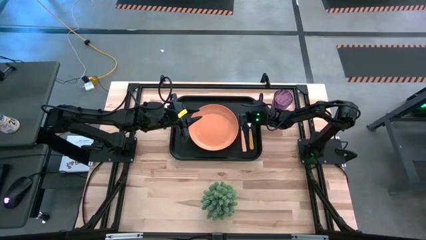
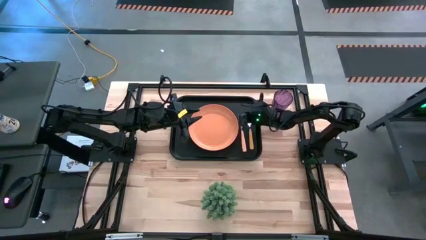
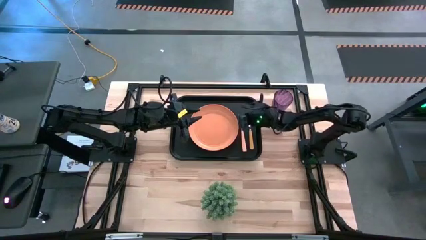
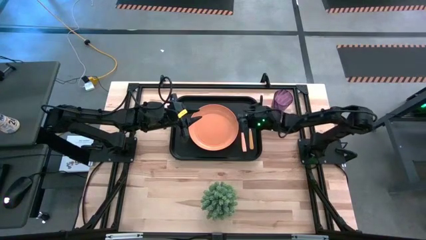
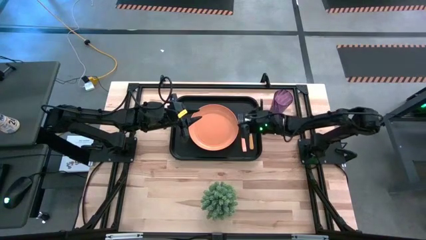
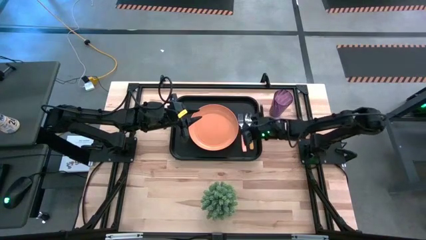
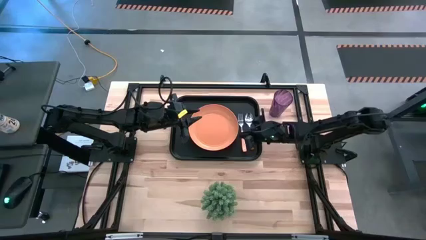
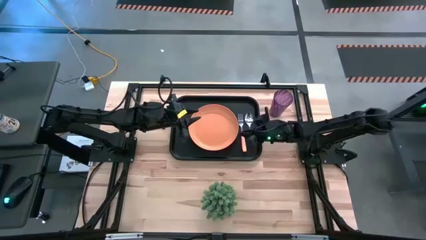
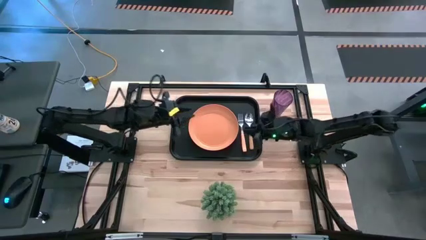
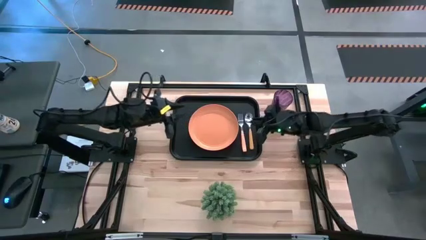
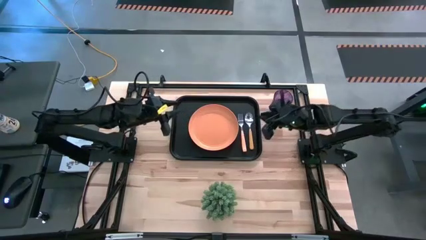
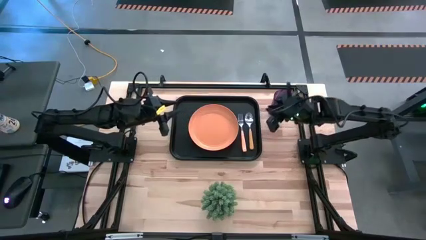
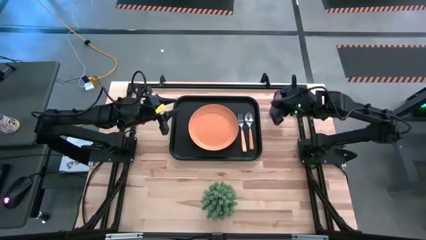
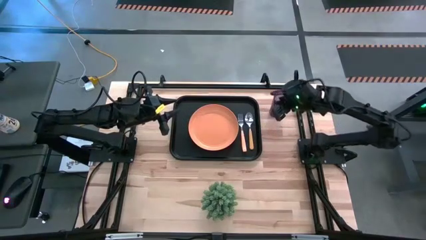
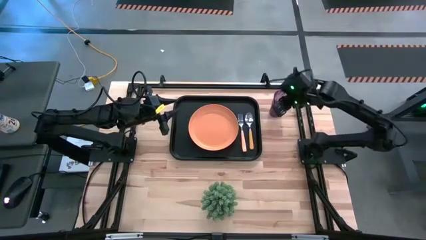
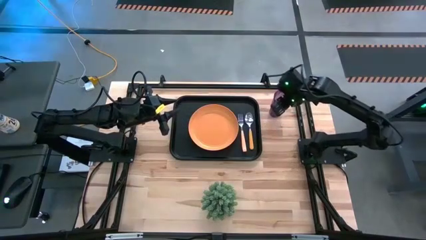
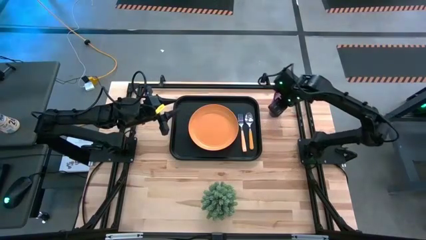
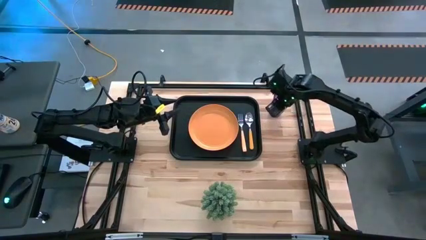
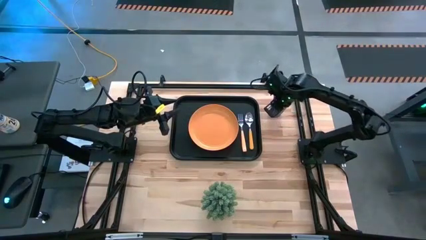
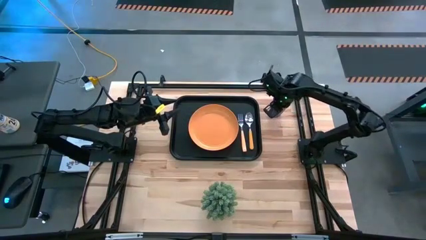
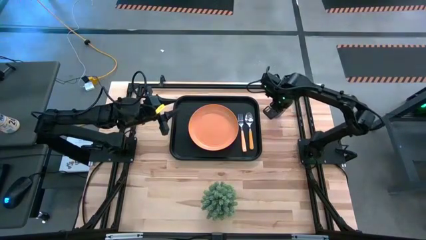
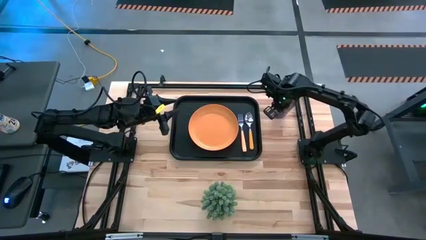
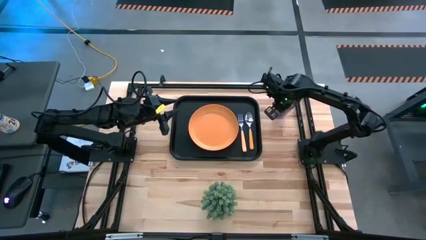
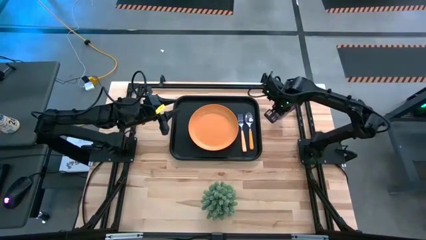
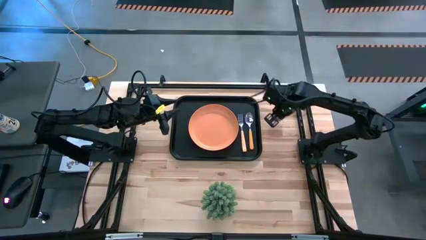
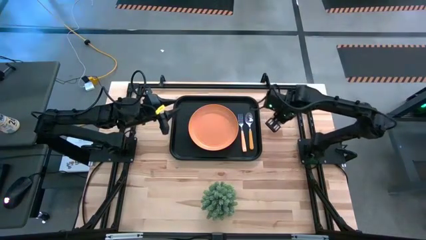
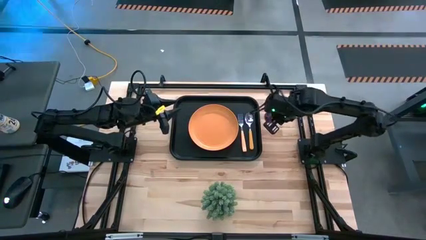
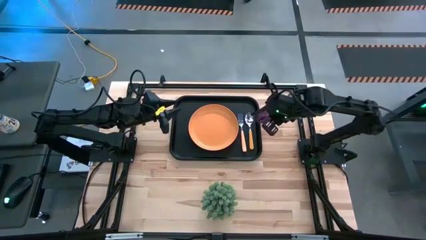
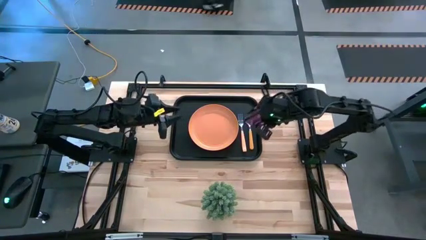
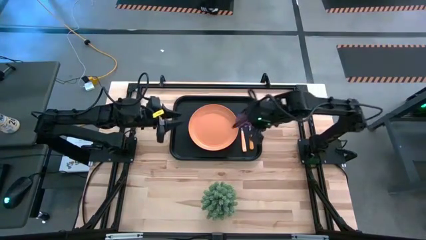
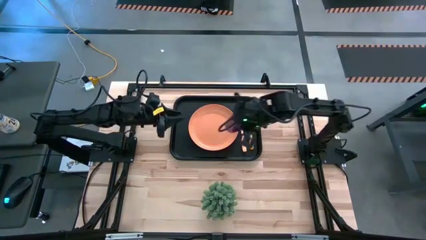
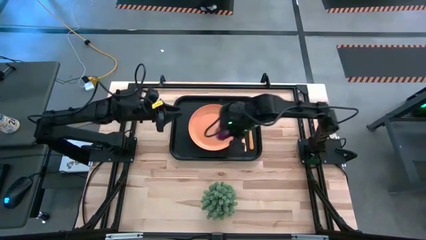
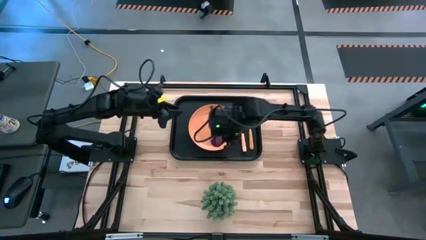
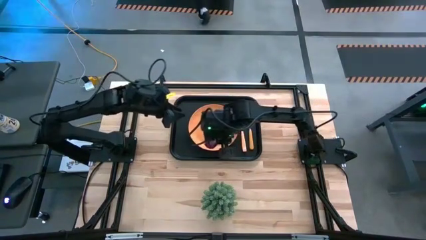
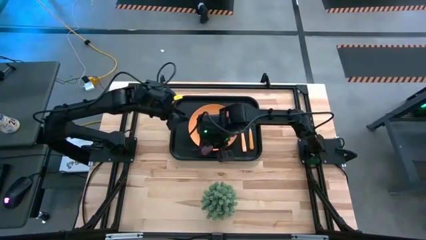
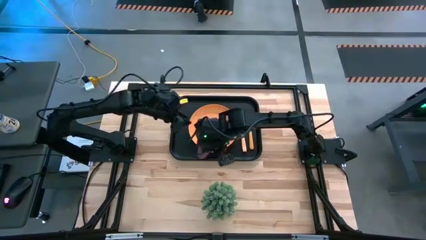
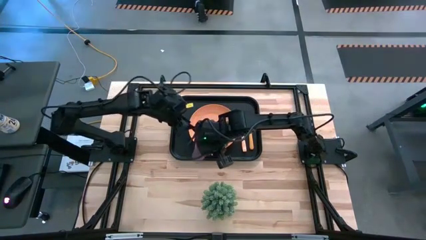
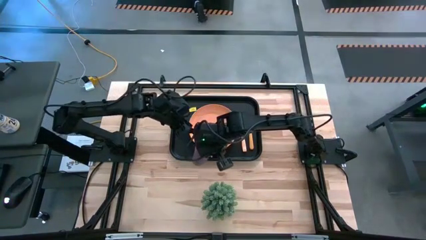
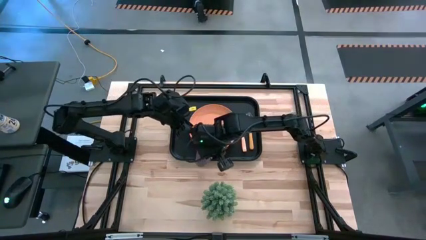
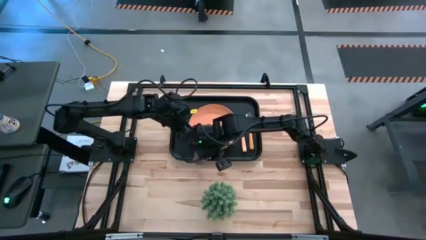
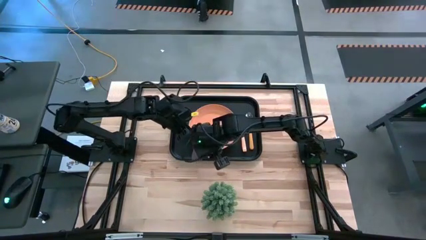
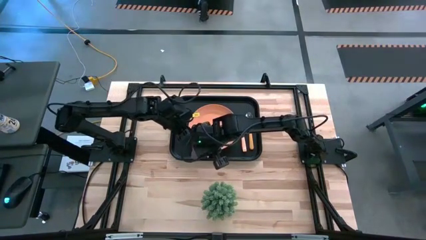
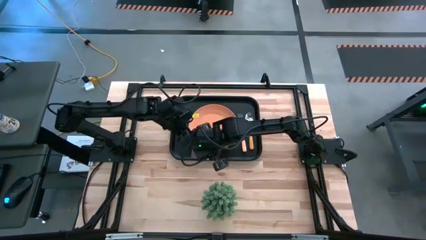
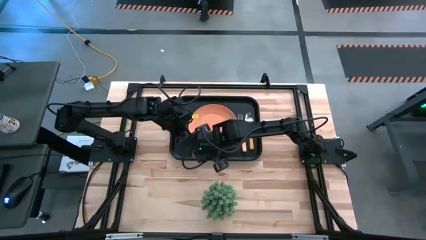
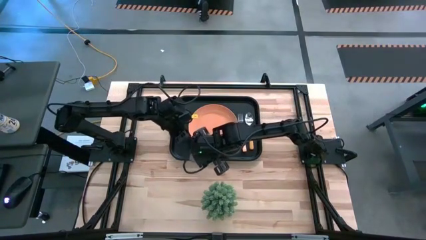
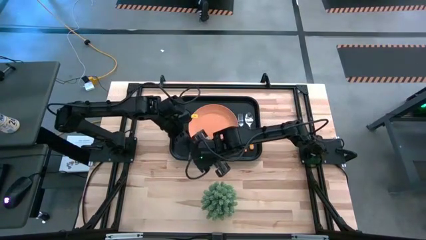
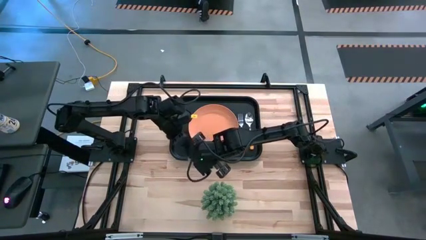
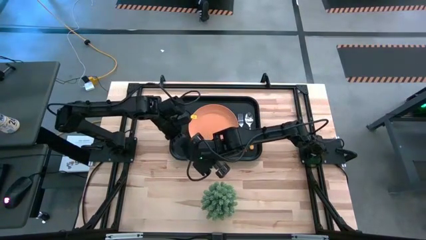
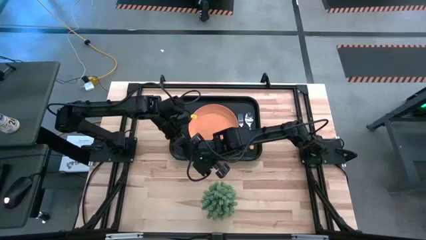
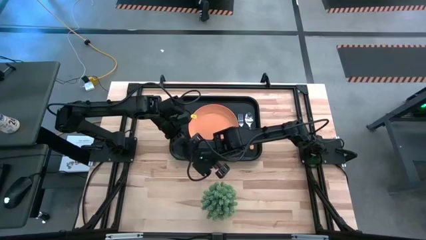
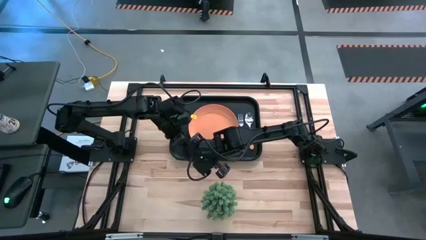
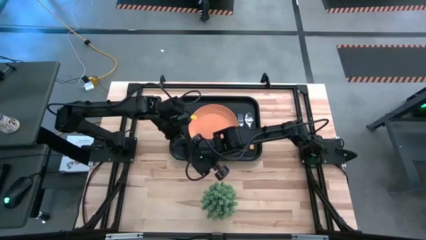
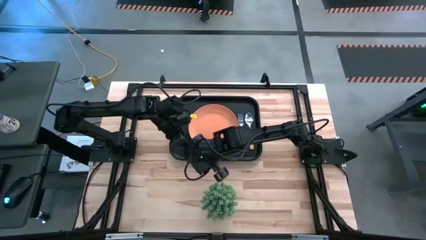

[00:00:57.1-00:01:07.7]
Task: Pick and place plate/cup/fork/spoon on tray
Put the purple cup on the black tray

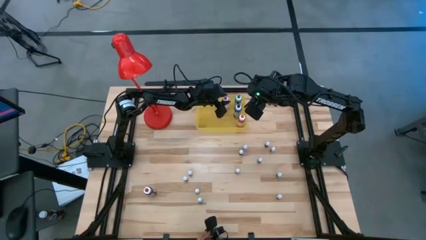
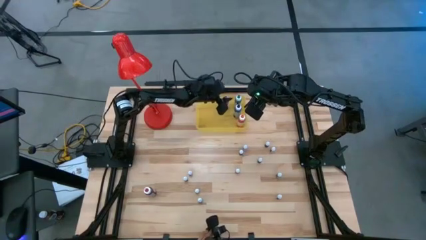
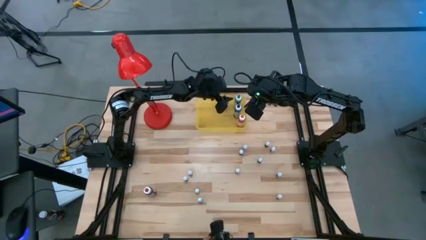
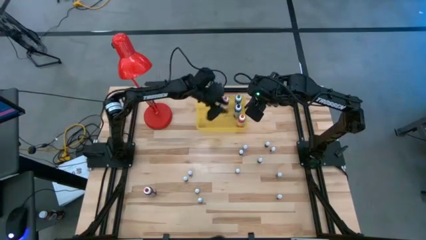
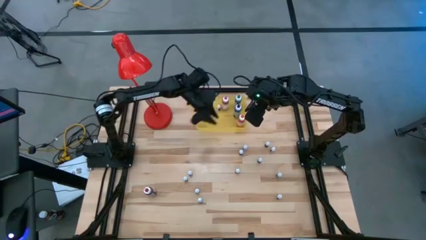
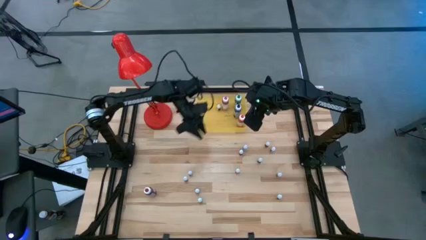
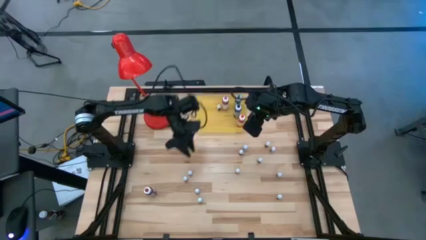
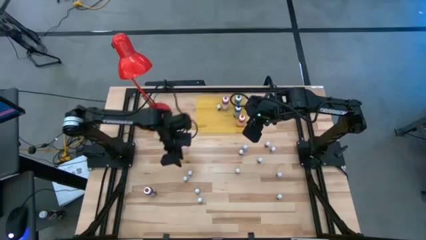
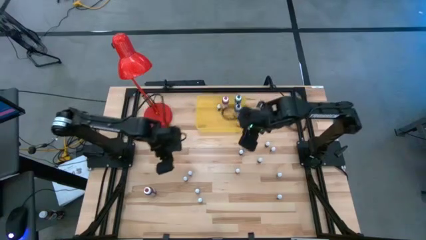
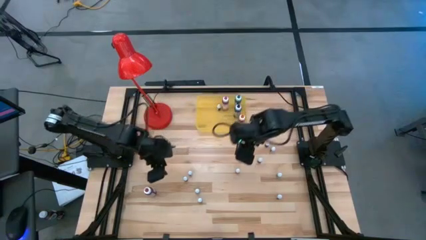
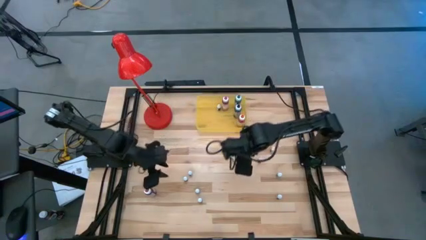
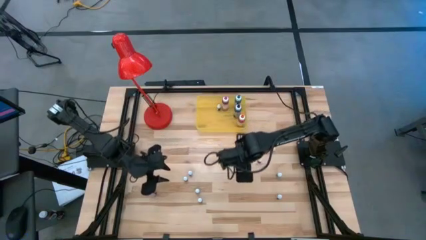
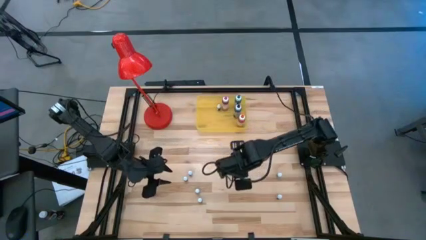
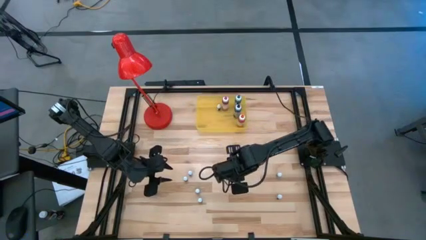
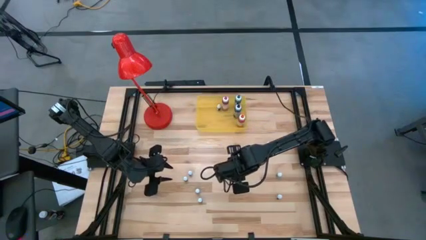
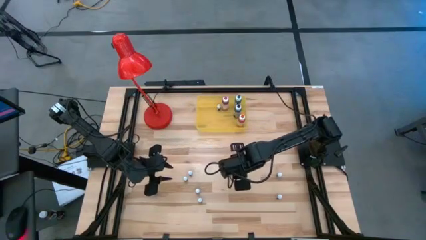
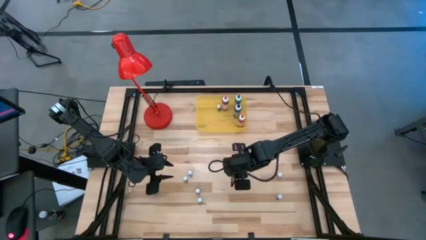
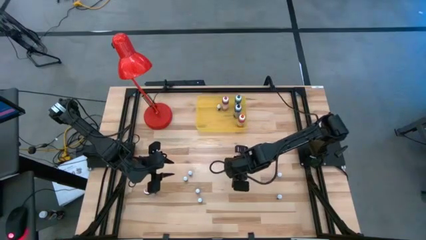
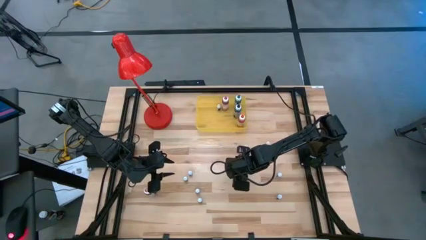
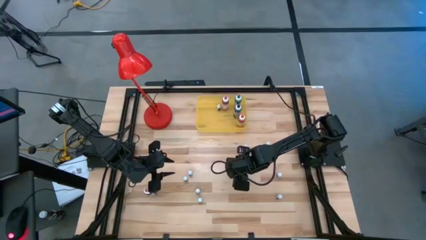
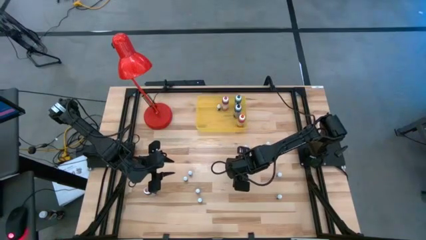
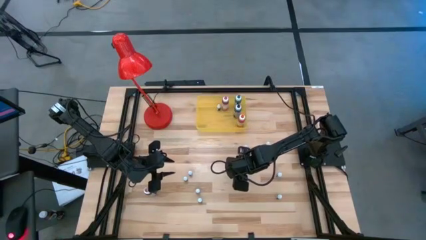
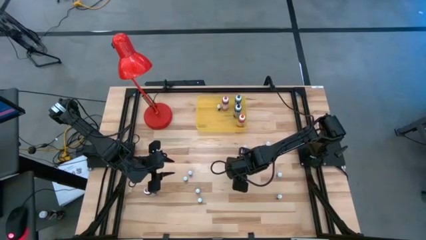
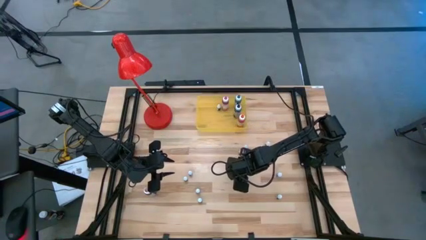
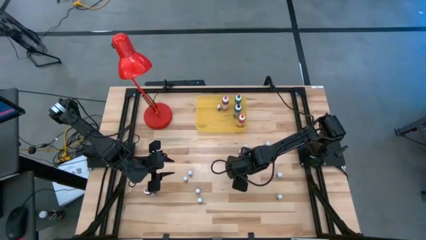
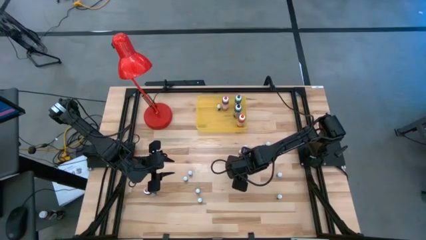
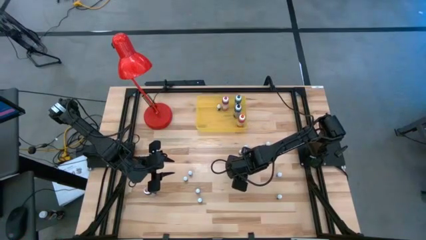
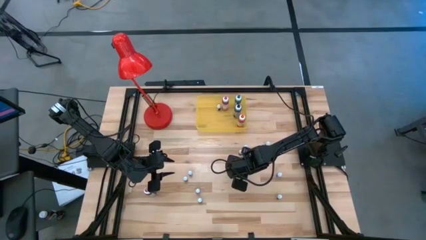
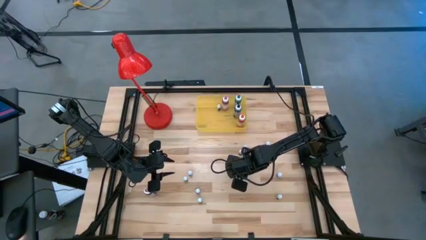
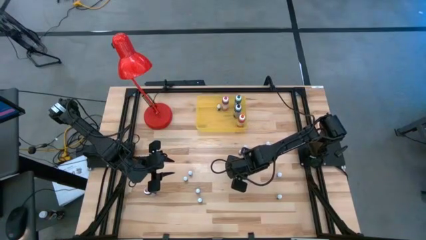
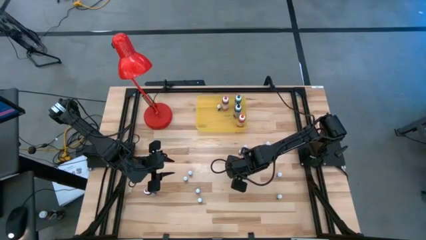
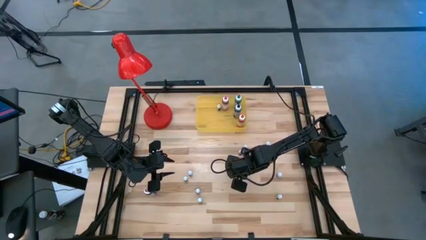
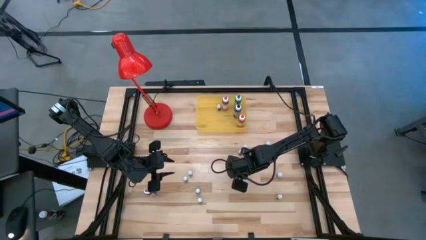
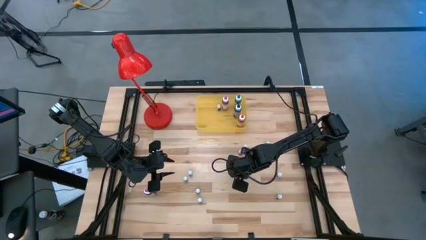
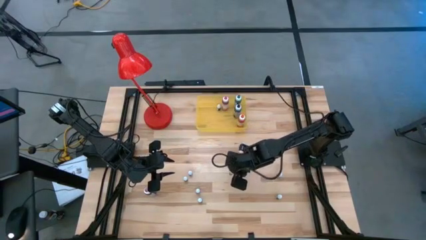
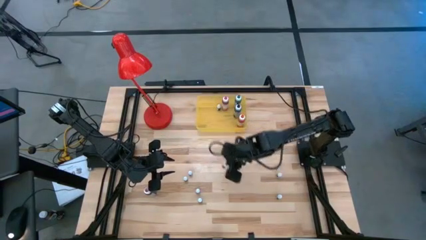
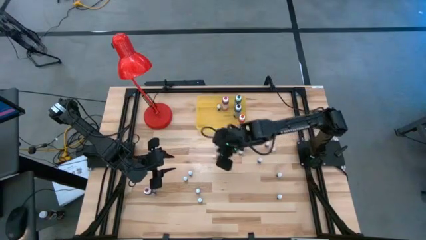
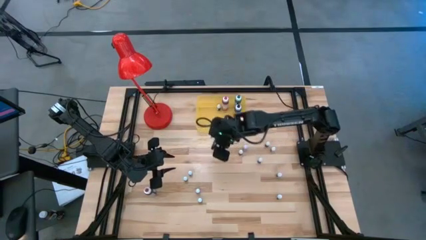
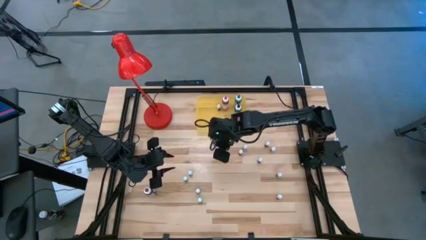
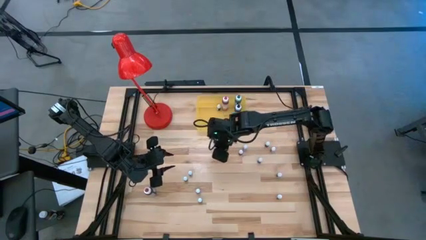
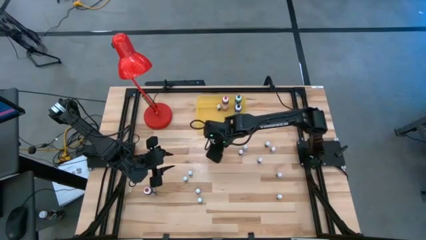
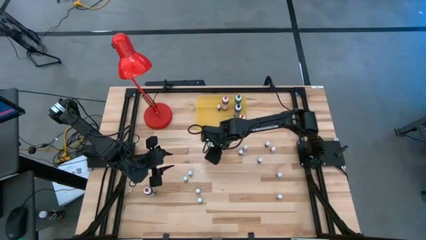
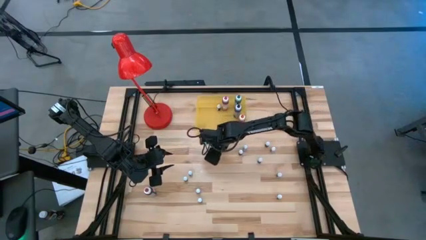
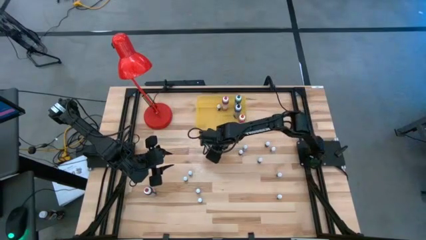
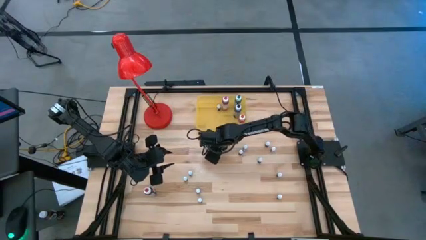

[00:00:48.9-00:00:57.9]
Task: Pick & Place food coloring
Put the small orange food coloring bottle into the yellow bin
